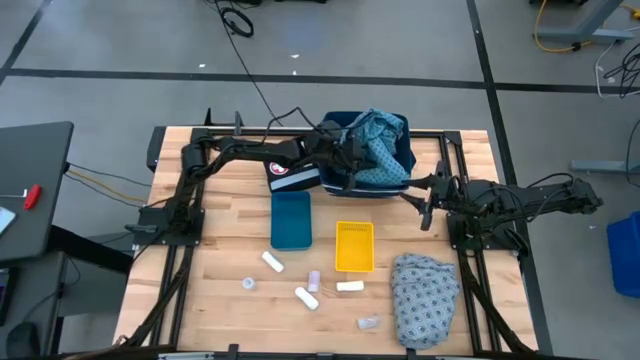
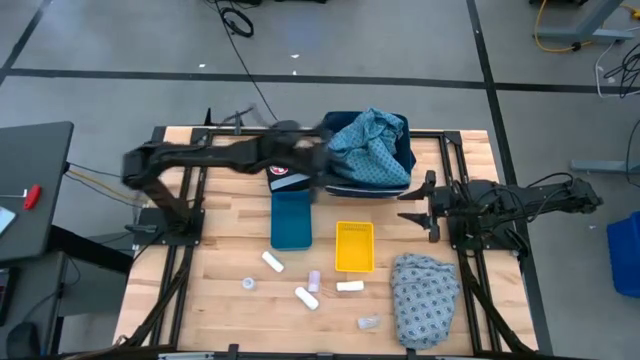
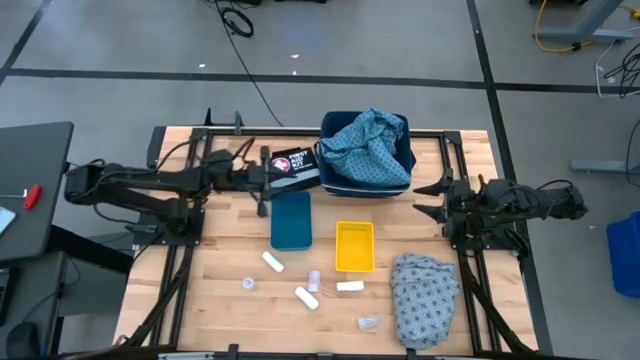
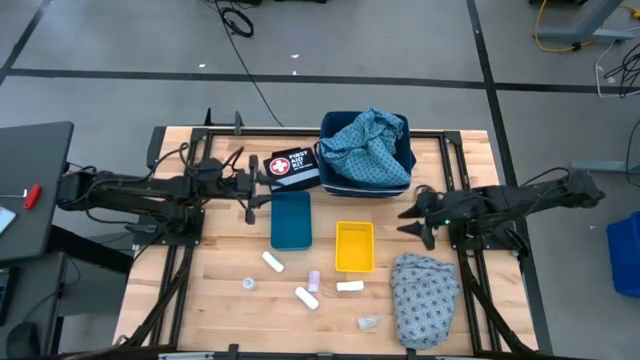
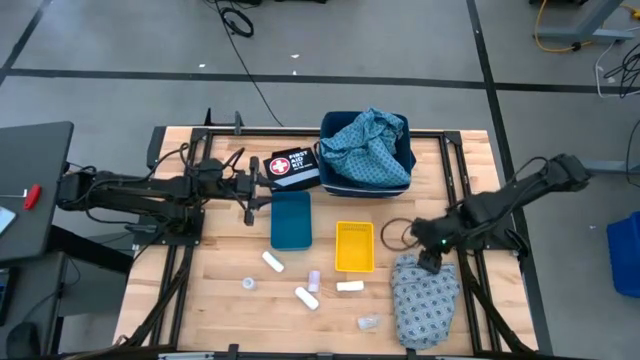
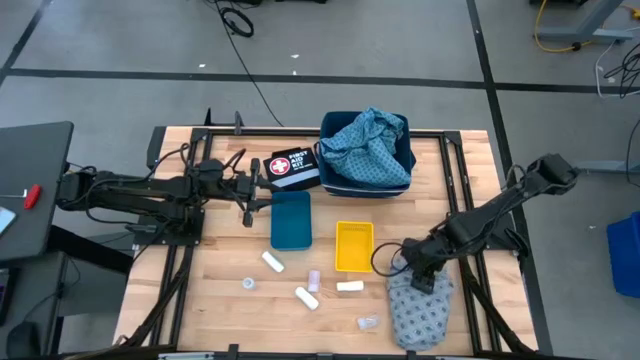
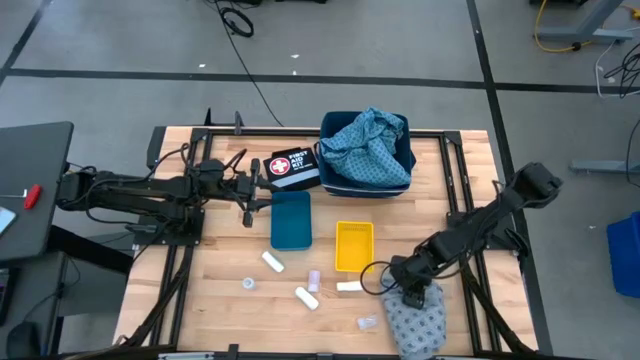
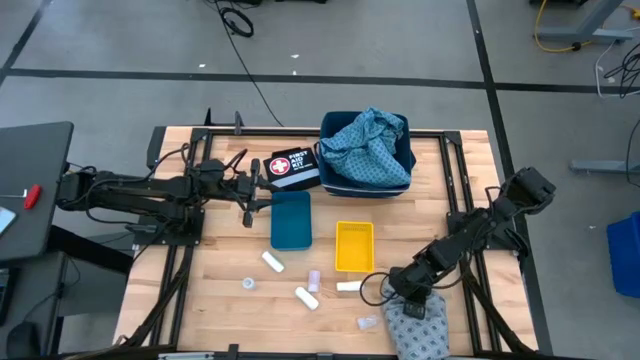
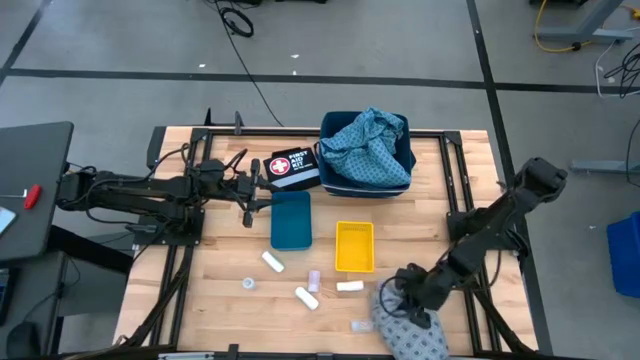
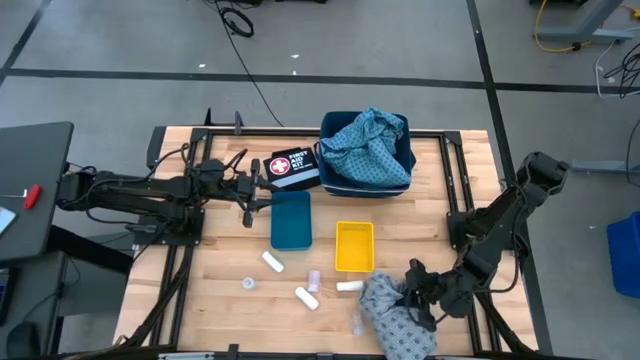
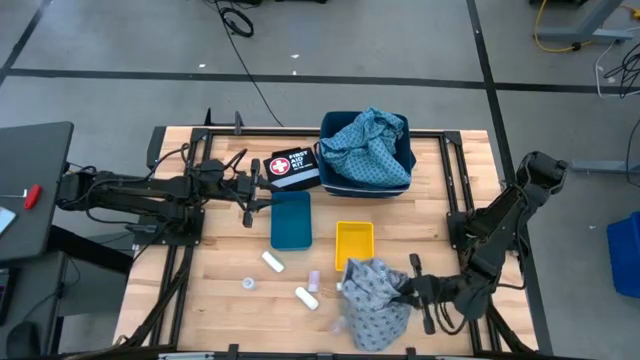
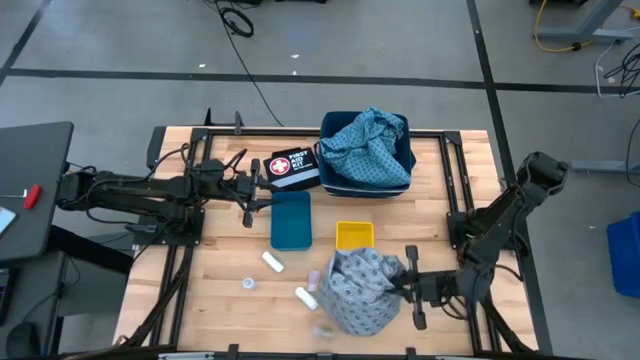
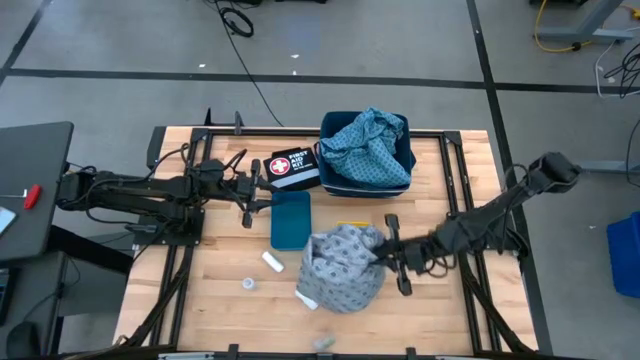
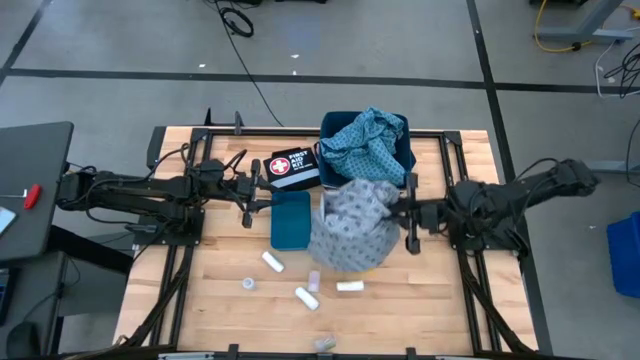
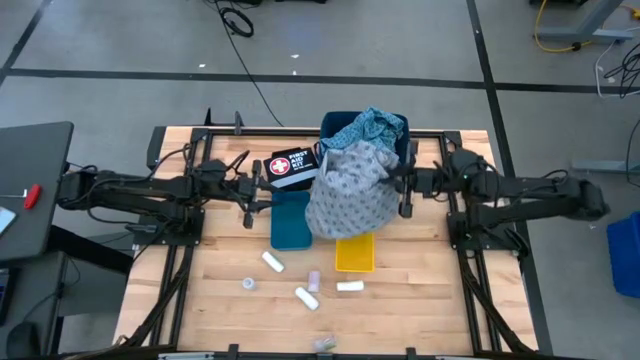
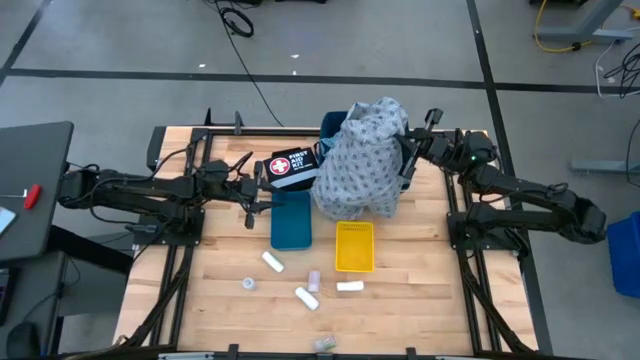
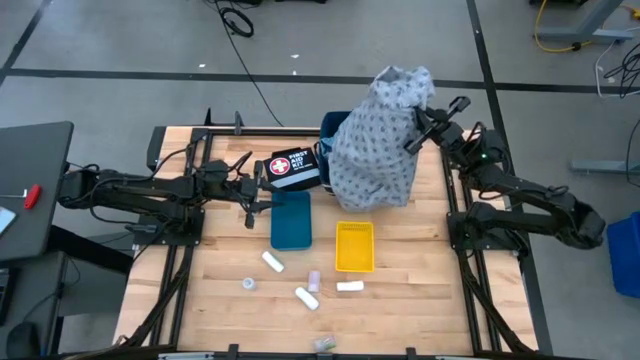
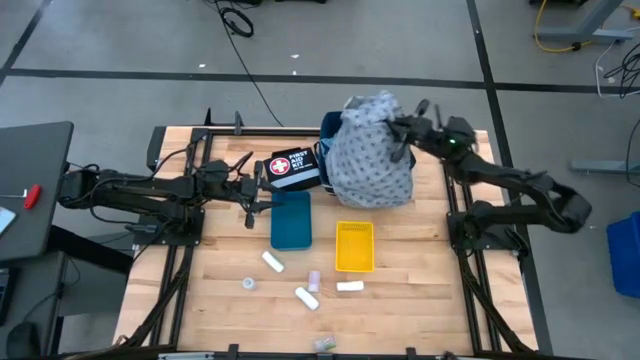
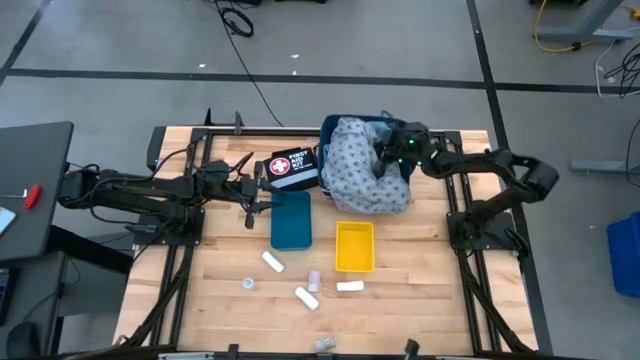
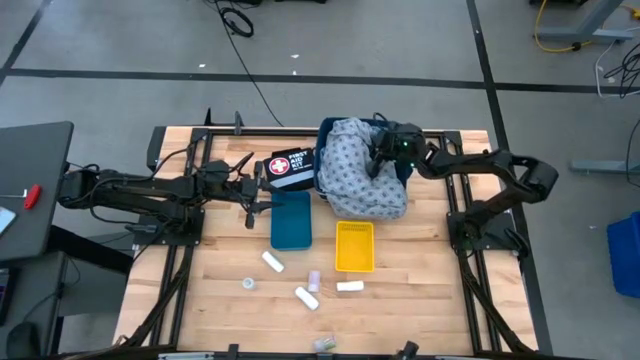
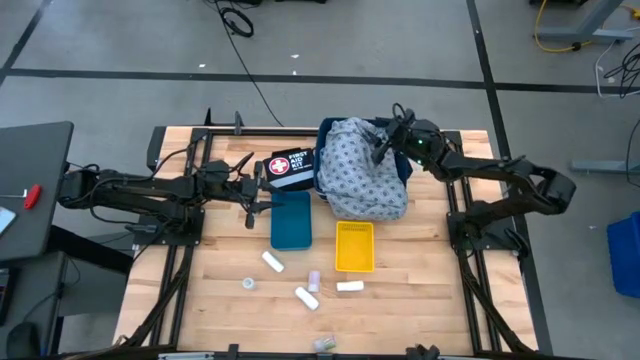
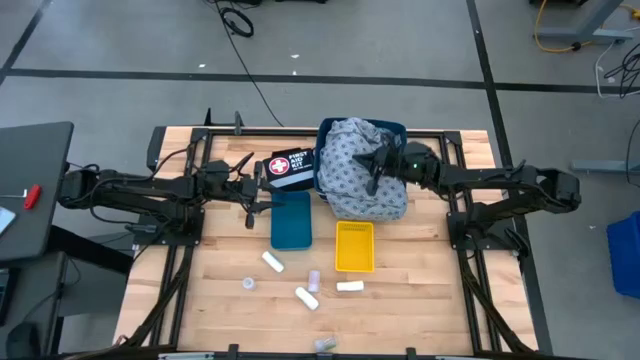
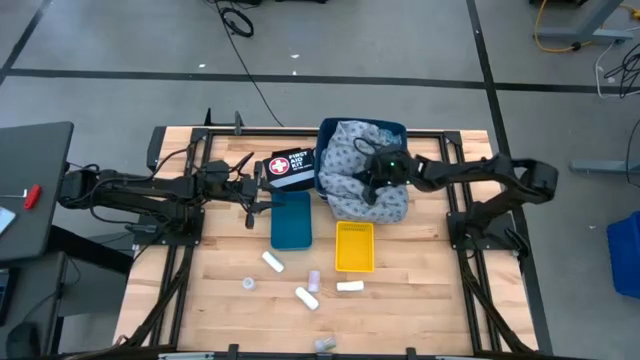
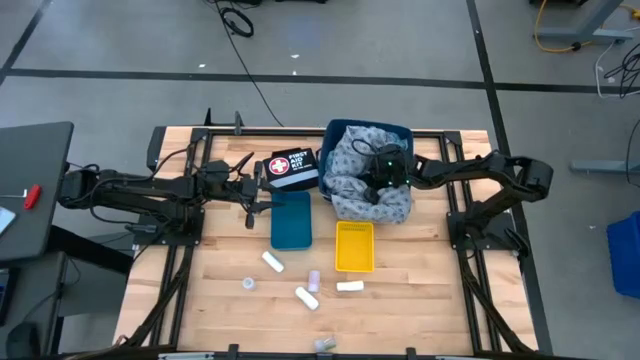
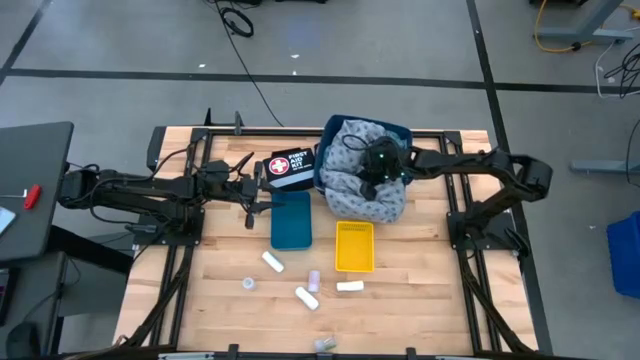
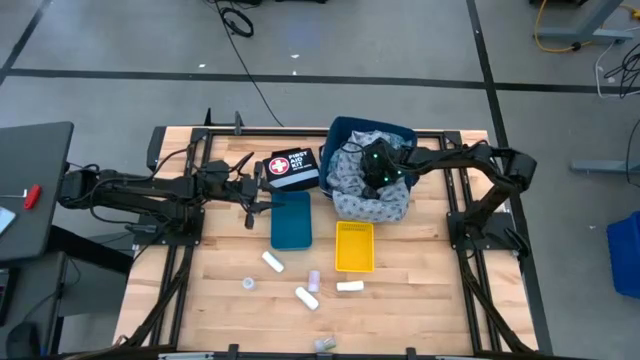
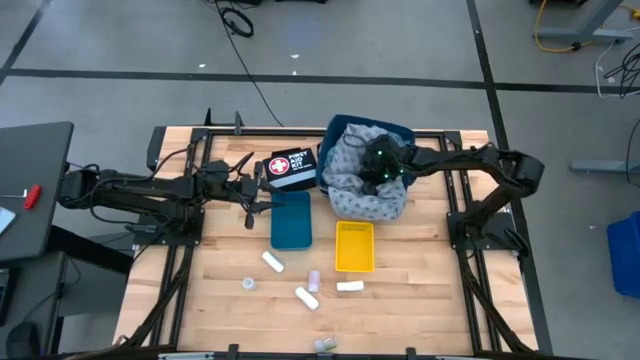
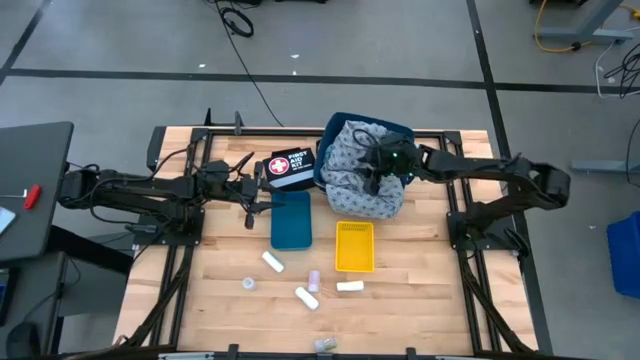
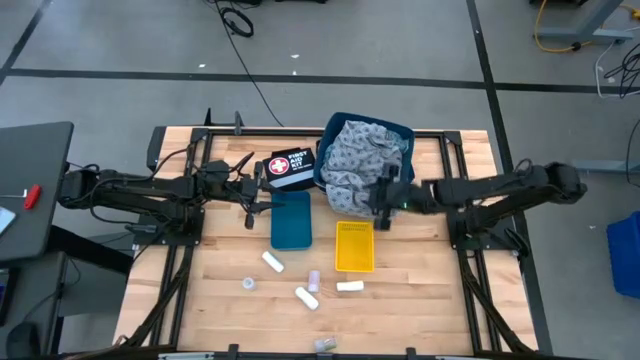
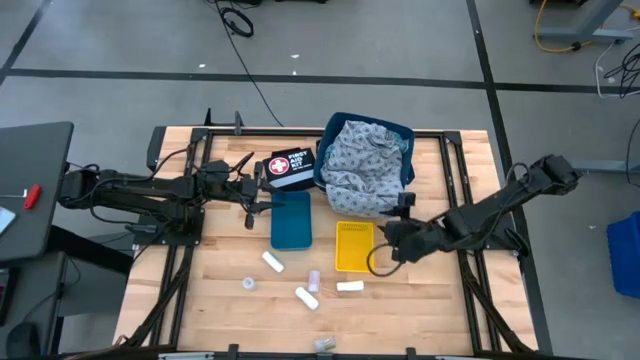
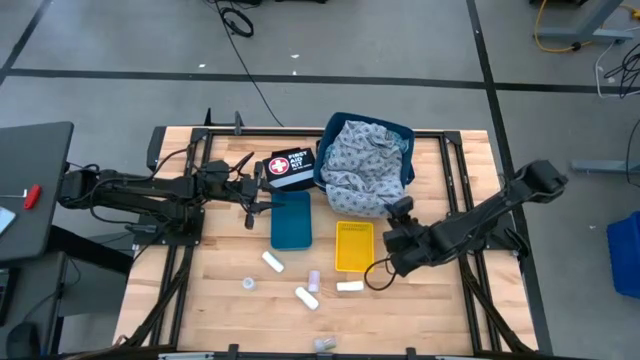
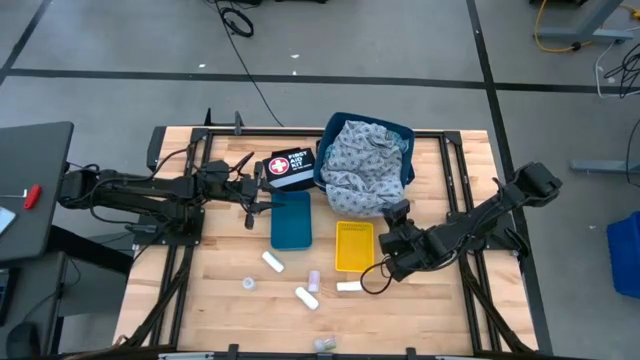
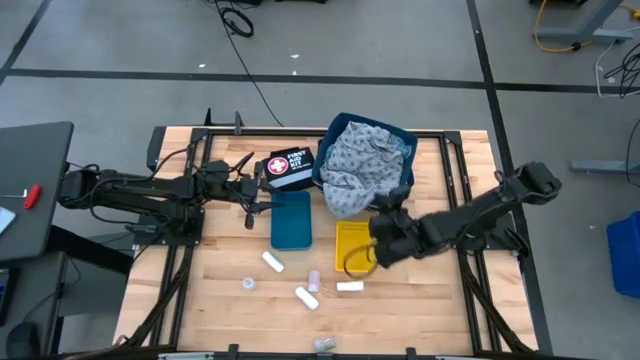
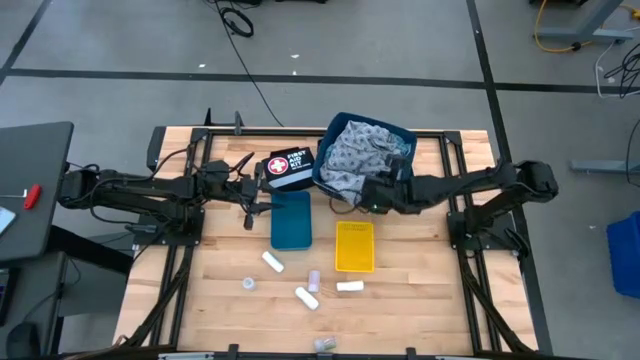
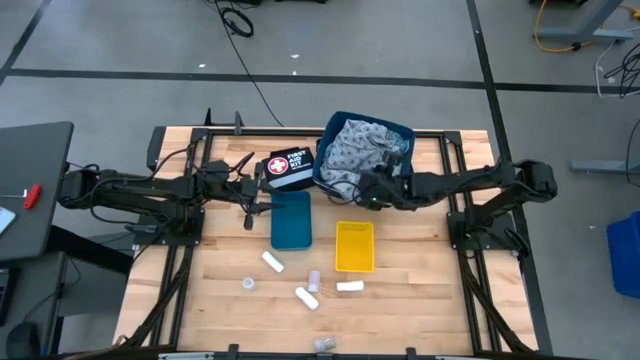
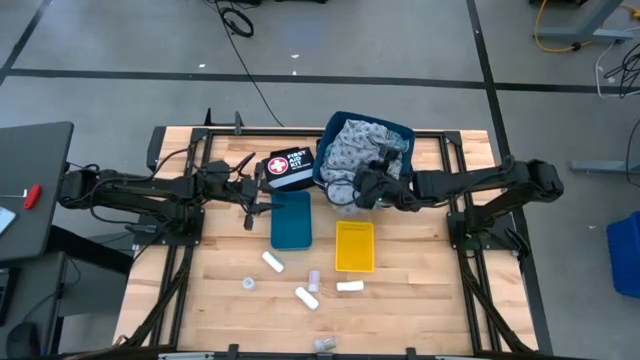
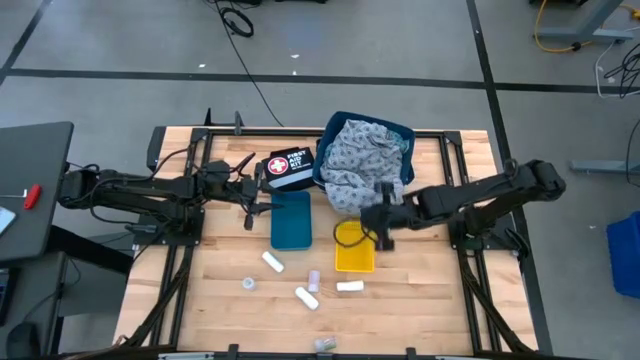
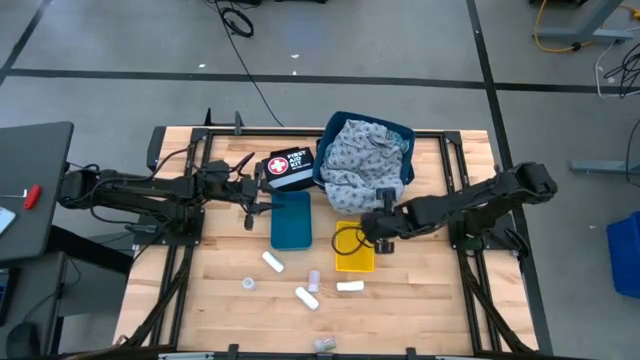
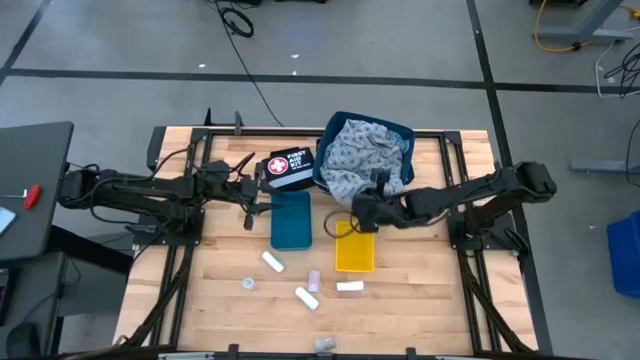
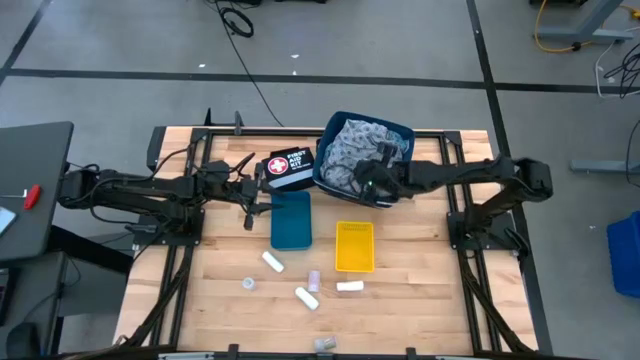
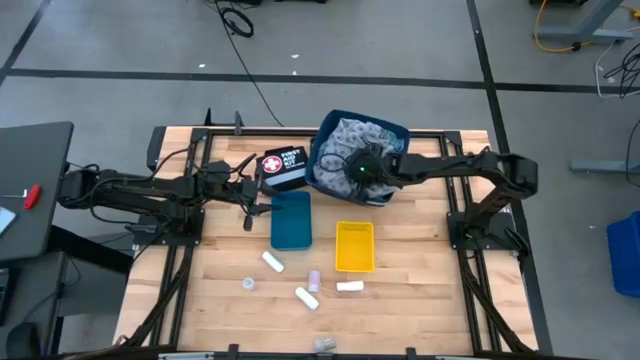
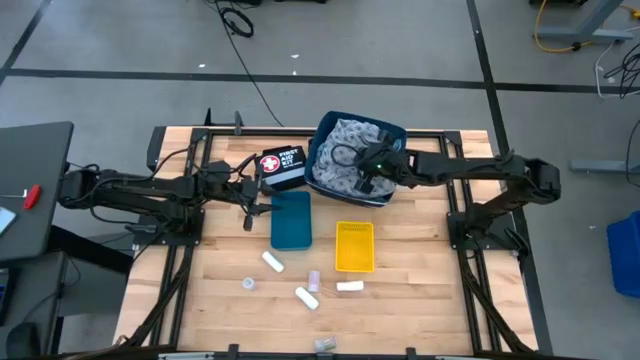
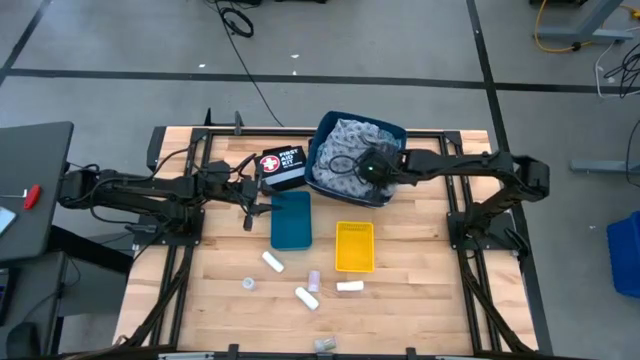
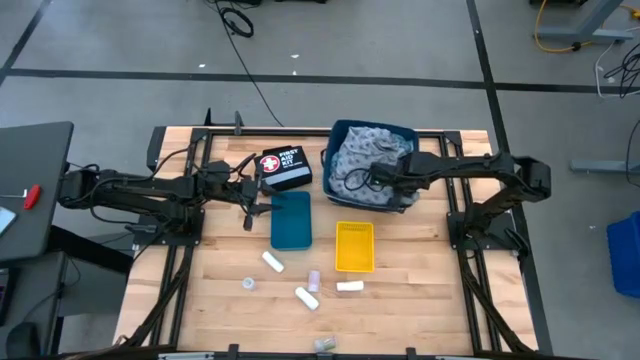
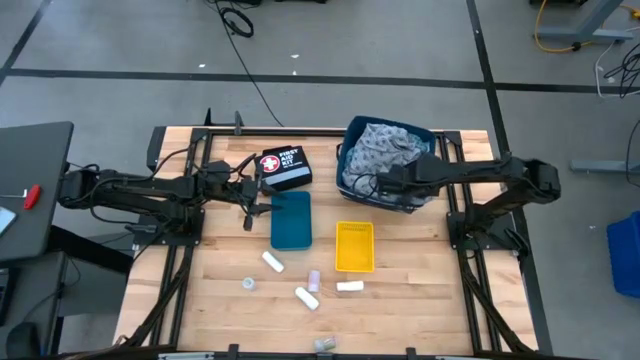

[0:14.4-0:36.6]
Task: Pick & place medical supplies in basket/bin
Put the light gray patient gown into the blue laundry bin
